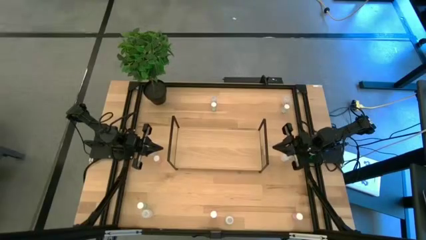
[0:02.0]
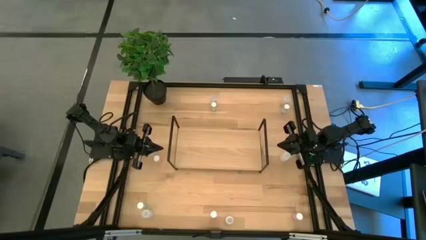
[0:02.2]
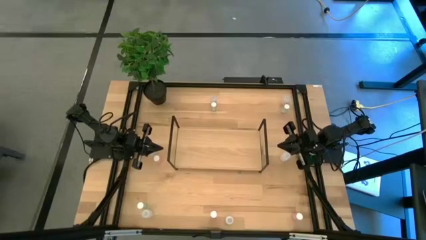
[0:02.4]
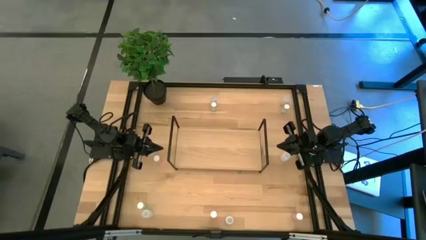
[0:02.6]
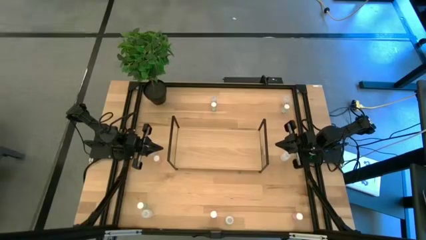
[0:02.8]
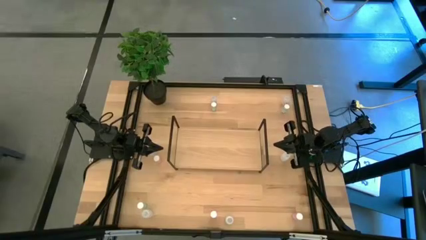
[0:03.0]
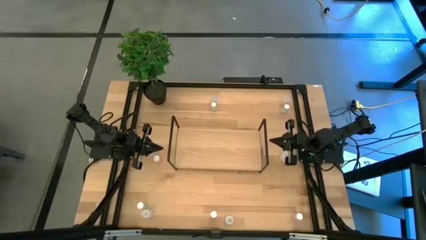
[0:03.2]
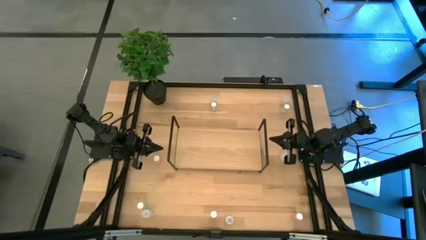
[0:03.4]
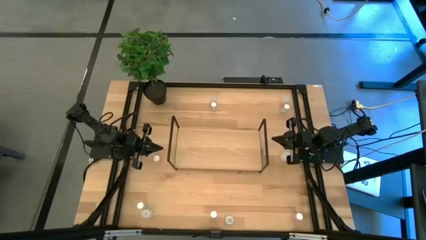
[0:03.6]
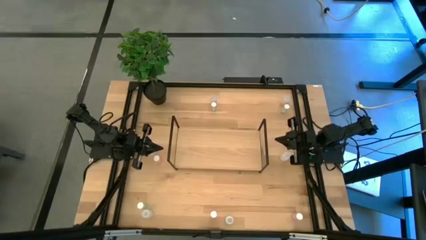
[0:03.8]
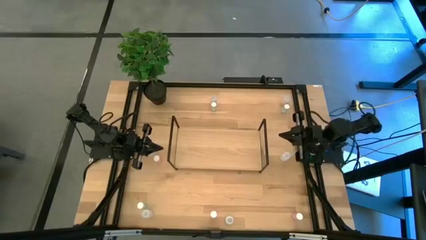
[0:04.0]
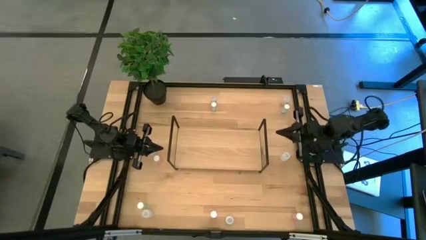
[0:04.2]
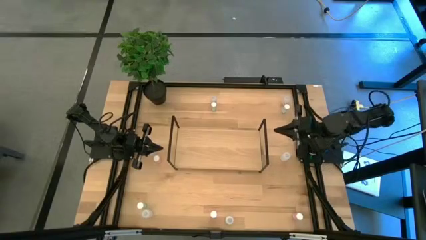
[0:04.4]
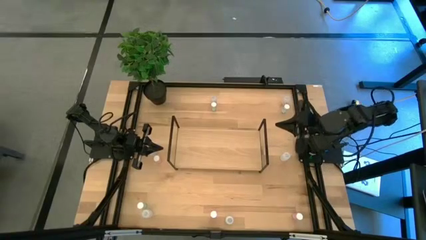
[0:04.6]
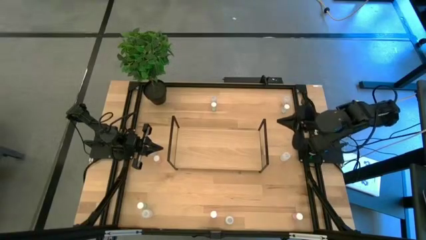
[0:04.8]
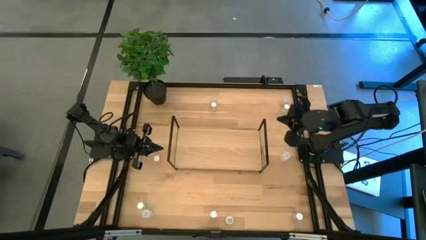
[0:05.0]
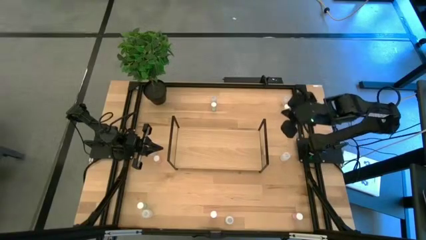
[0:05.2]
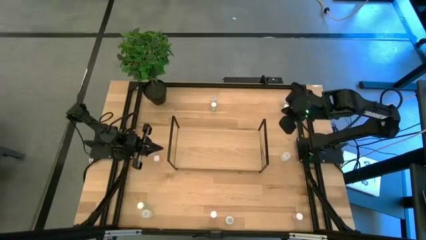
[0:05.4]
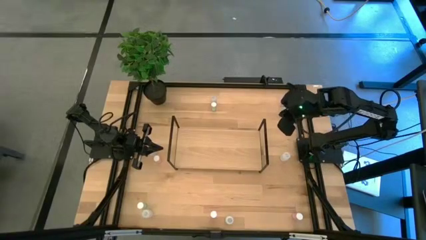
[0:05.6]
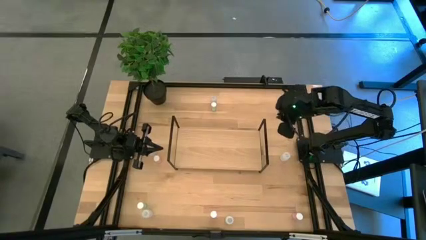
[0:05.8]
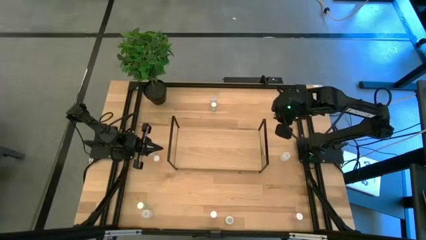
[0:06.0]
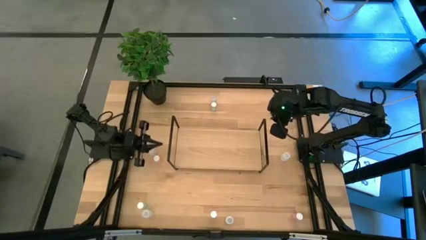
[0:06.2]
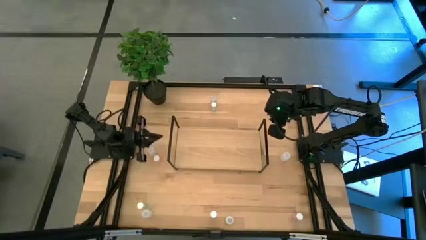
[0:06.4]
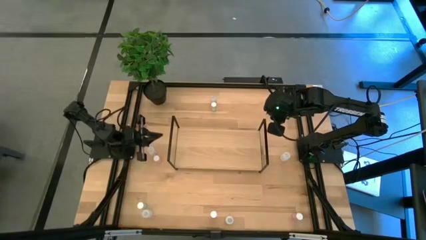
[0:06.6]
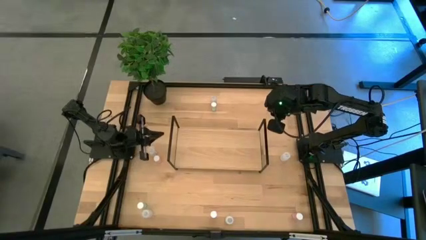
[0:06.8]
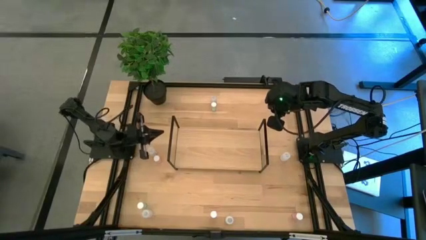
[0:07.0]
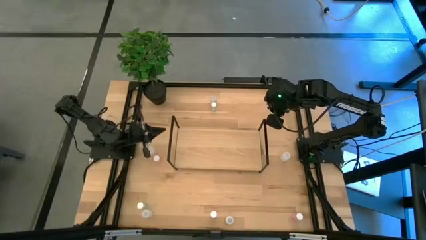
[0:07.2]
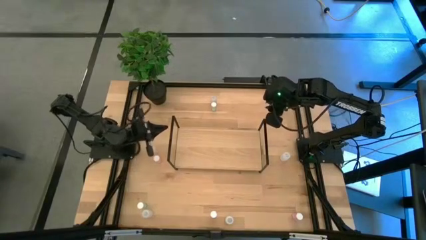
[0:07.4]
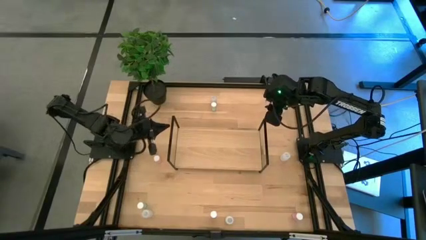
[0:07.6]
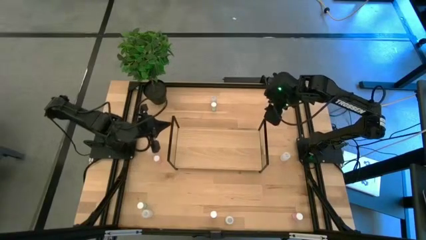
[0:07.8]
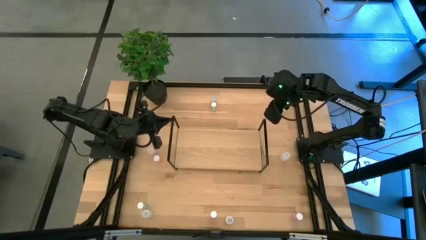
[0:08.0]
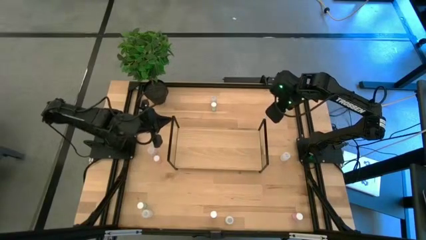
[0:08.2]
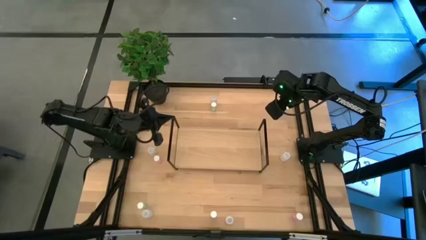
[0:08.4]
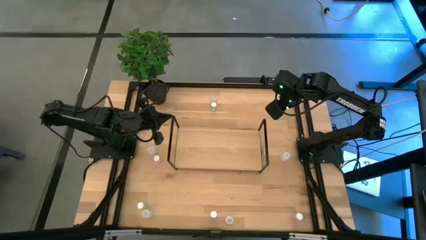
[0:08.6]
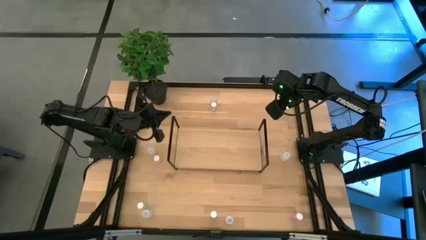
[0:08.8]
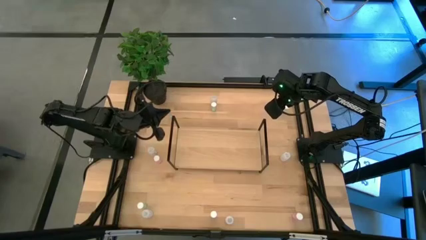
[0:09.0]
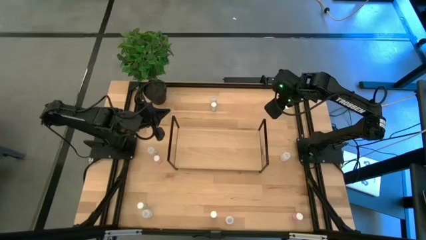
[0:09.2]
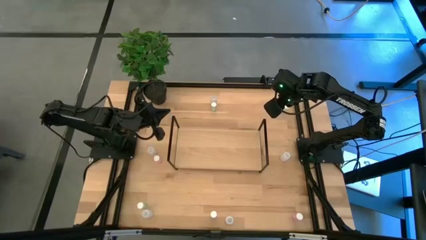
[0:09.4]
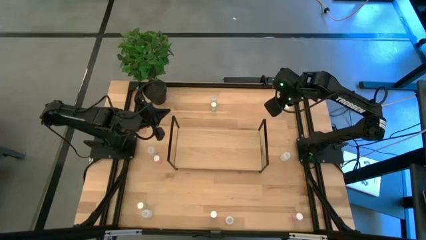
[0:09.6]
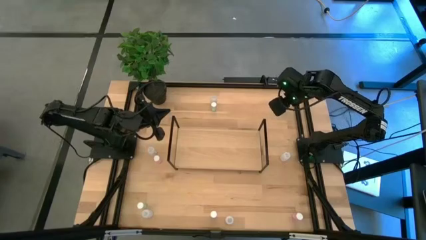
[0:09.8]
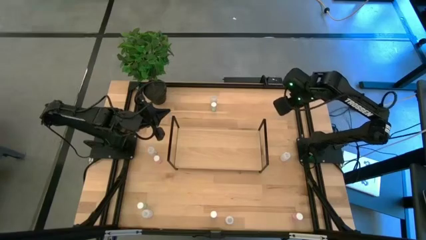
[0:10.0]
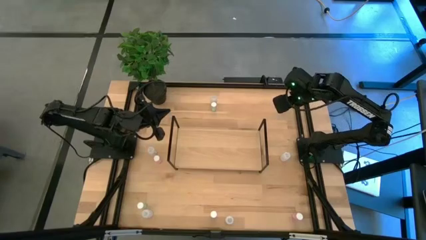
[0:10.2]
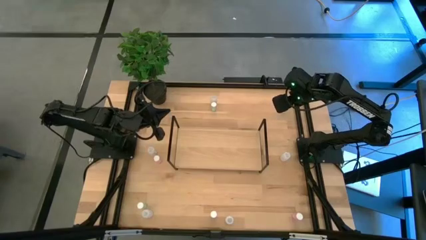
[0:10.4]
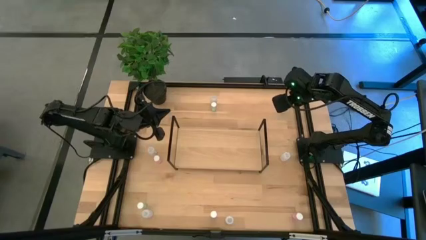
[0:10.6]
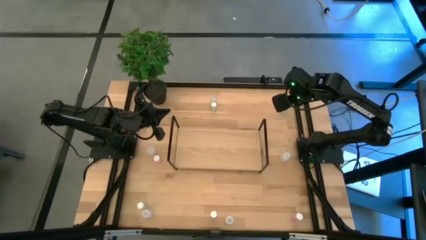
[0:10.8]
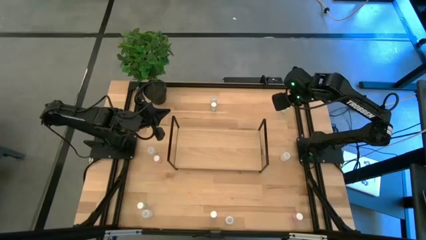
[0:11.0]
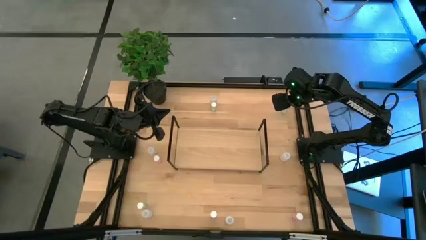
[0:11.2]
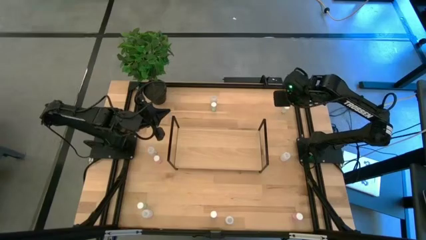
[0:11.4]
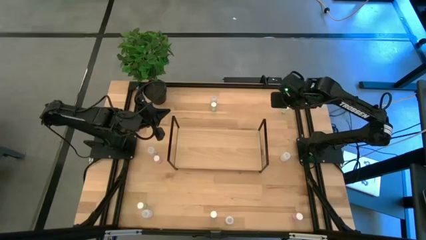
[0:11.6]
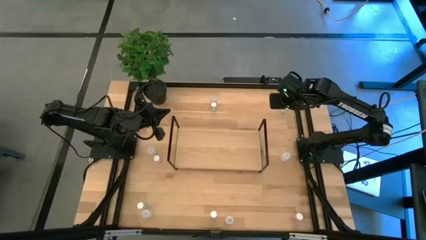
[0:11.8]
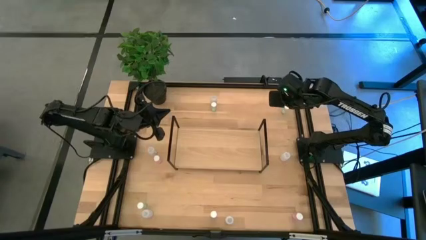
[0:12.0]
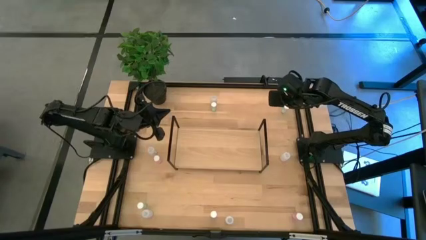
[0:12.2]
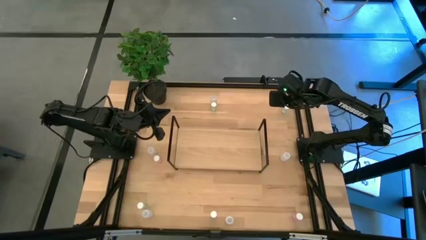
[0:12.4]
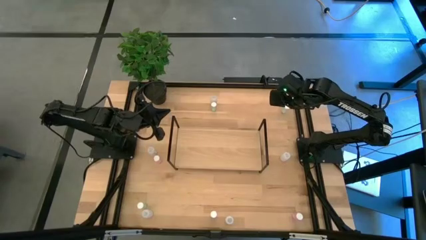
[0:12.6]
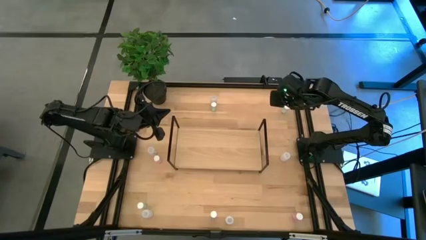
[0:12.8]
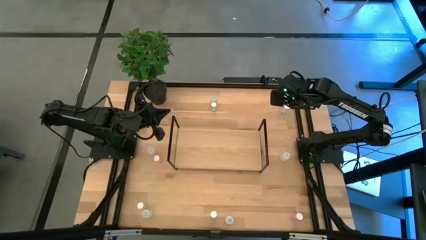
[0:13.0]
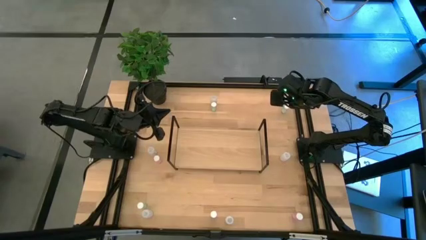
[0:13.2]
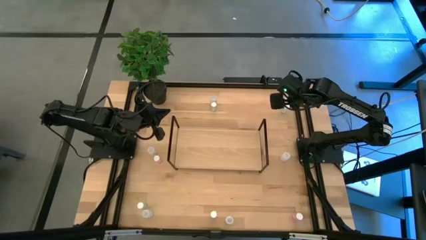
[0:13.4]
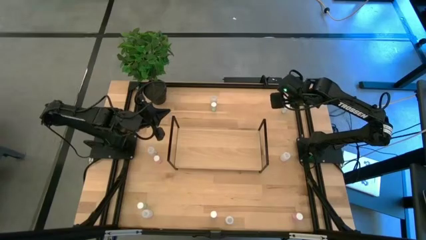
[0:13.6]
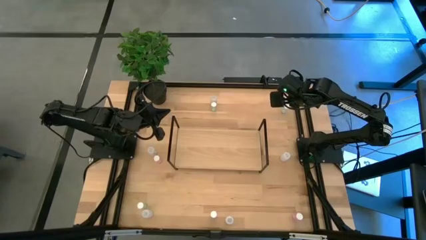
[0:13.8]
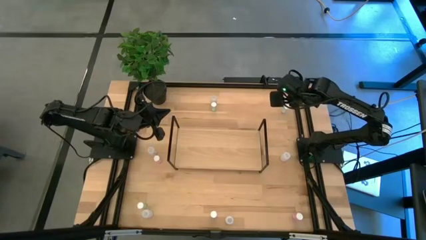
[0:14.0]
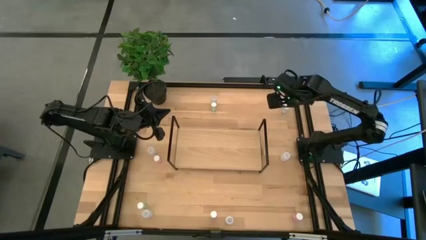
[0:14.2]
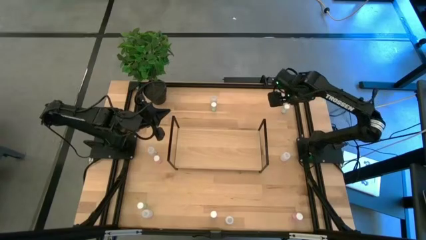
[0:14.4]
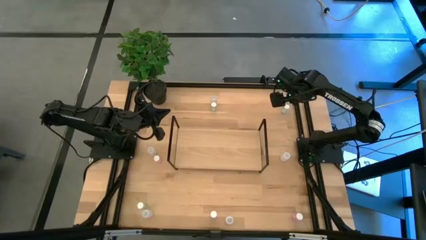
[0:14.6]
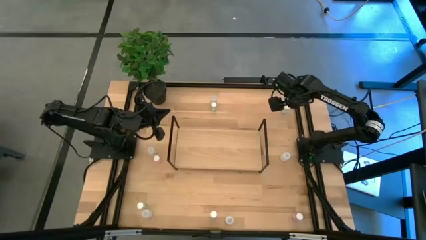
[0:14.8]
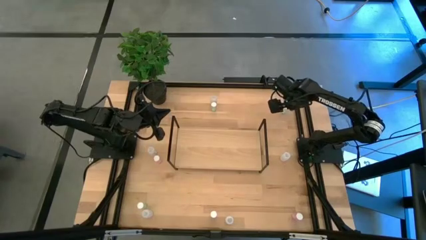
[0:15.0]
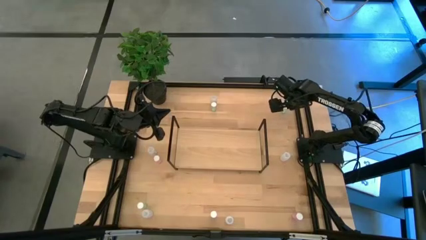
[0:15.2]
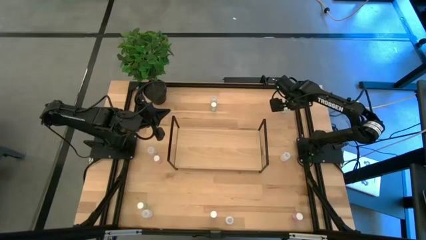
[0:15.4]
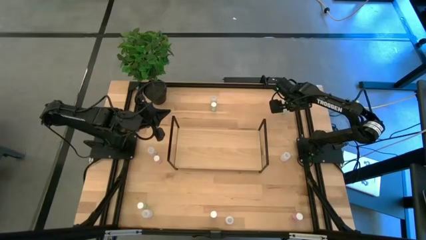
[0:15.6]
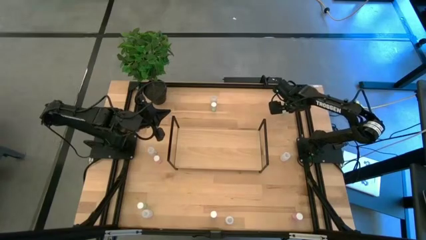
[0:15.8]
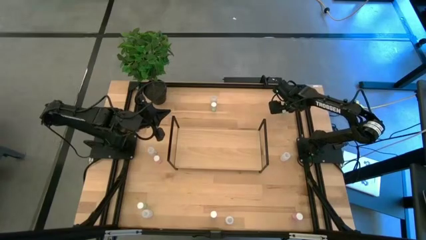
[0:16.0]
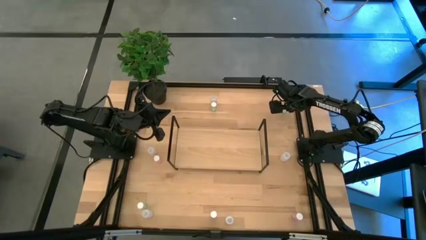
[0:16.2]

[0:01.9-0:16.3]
Task: Pick and place medicine bottles onto shelf by color
Put the top right blue pill bottle on the shelf
